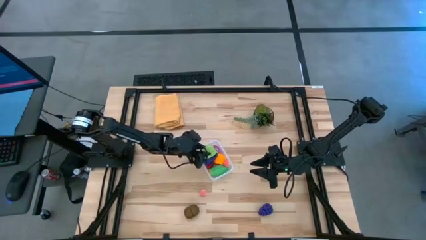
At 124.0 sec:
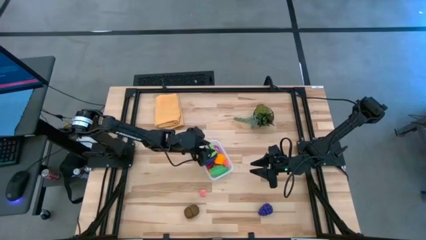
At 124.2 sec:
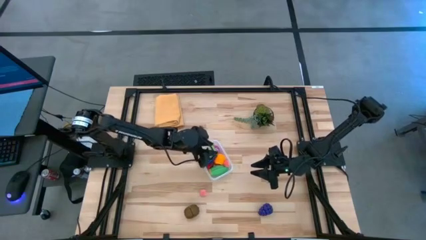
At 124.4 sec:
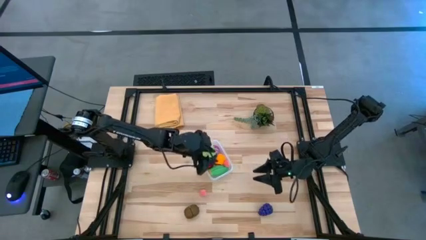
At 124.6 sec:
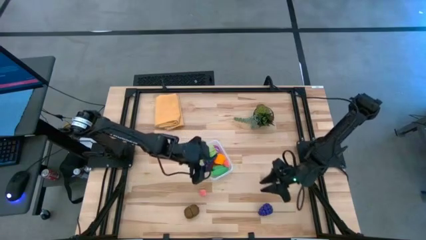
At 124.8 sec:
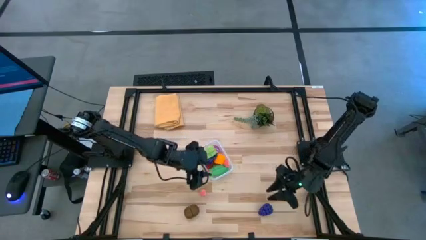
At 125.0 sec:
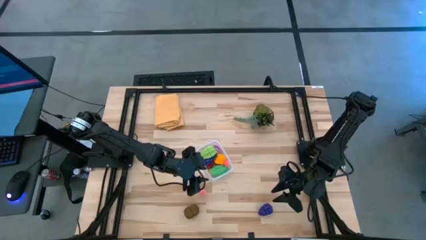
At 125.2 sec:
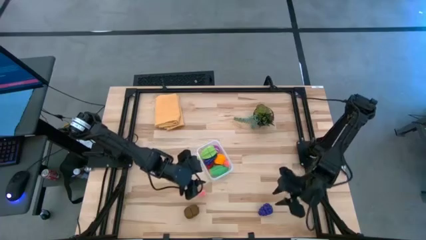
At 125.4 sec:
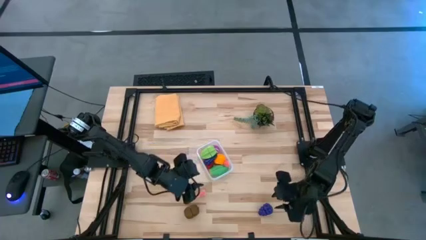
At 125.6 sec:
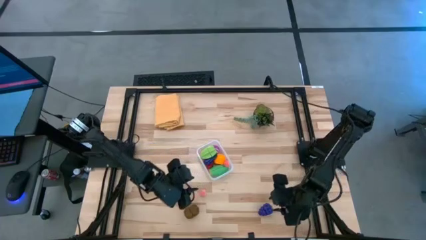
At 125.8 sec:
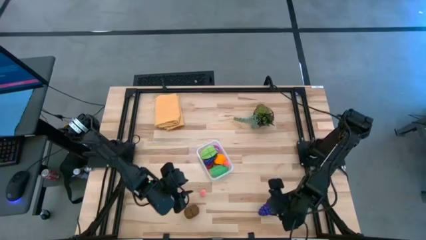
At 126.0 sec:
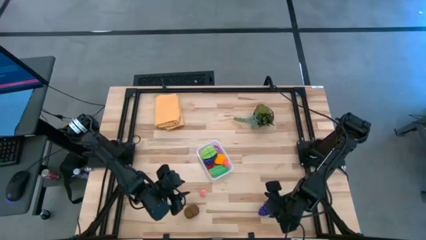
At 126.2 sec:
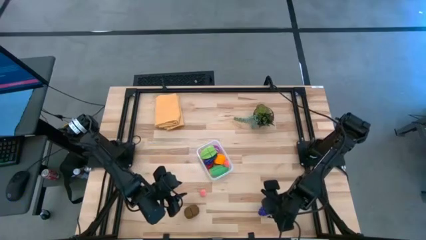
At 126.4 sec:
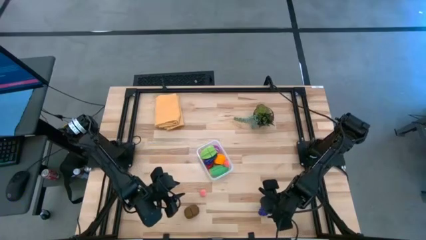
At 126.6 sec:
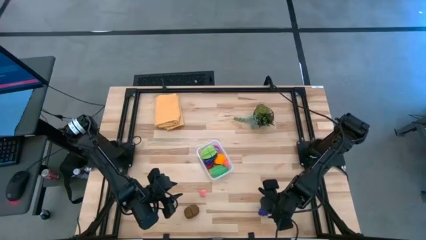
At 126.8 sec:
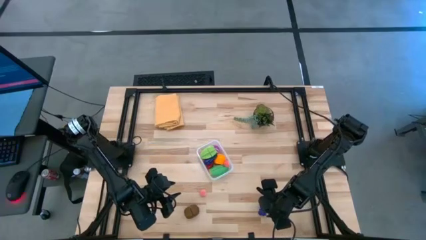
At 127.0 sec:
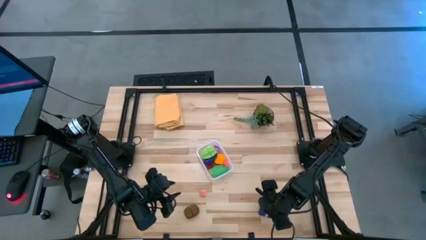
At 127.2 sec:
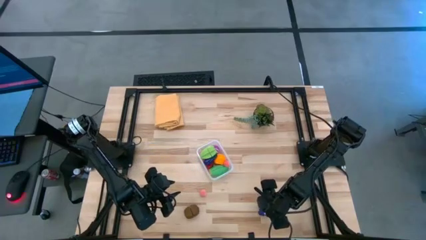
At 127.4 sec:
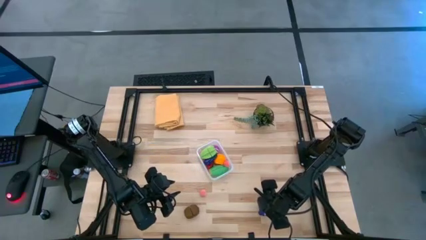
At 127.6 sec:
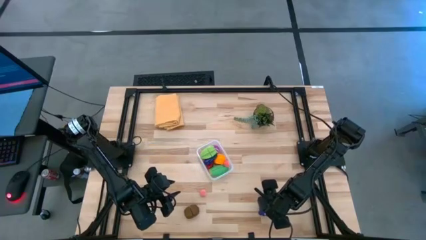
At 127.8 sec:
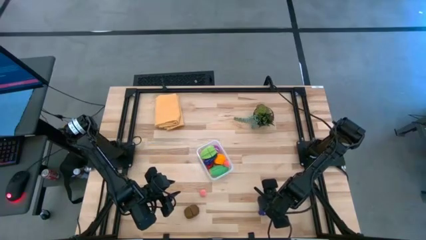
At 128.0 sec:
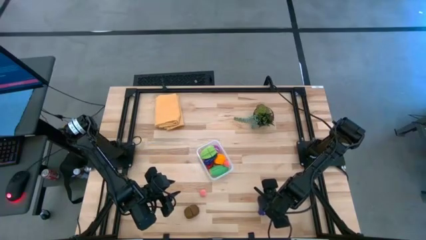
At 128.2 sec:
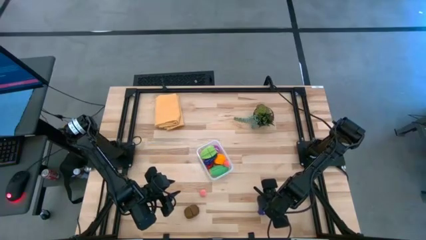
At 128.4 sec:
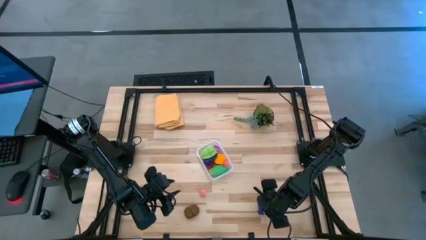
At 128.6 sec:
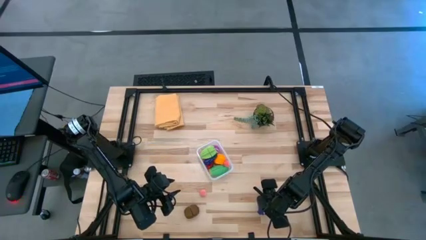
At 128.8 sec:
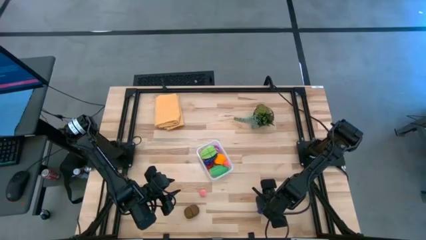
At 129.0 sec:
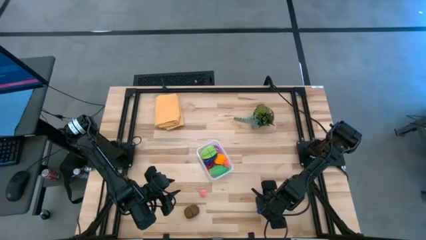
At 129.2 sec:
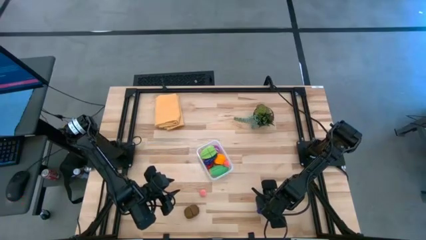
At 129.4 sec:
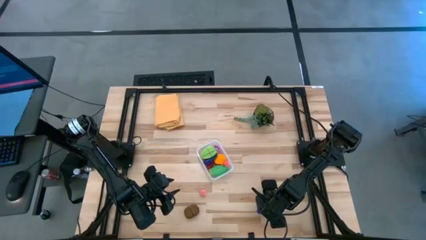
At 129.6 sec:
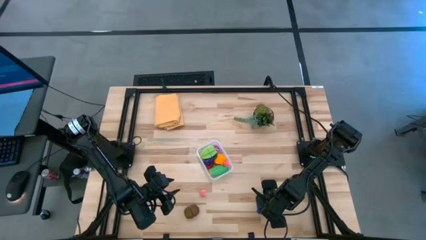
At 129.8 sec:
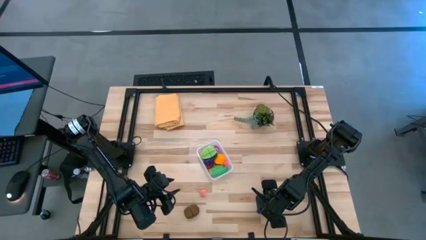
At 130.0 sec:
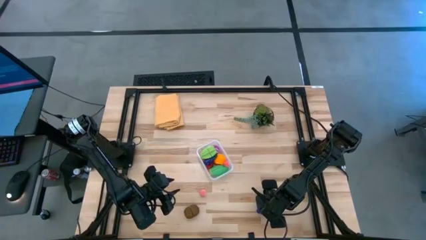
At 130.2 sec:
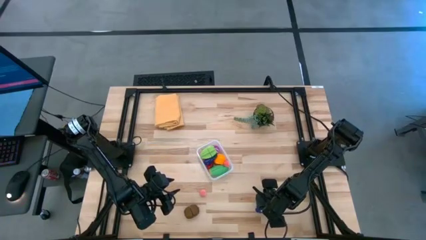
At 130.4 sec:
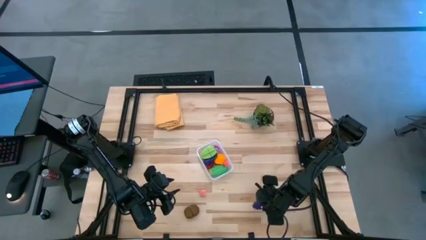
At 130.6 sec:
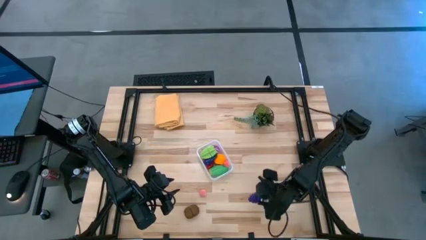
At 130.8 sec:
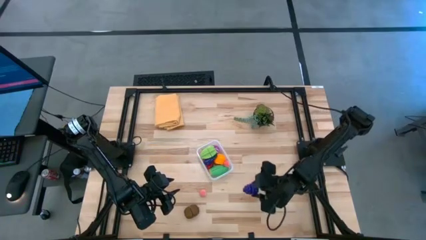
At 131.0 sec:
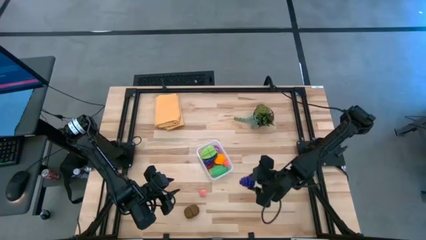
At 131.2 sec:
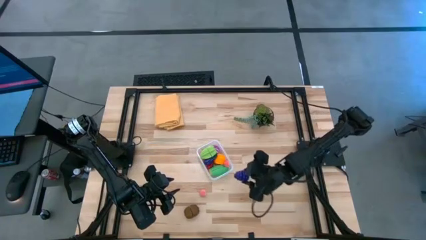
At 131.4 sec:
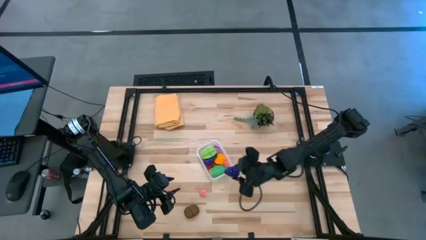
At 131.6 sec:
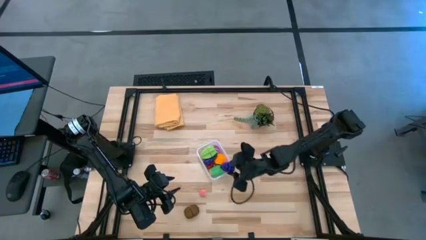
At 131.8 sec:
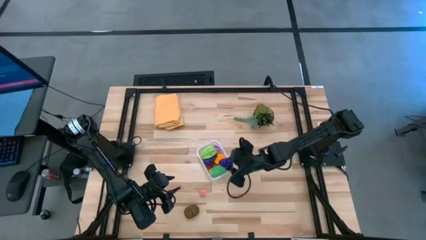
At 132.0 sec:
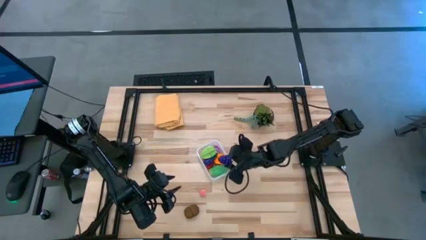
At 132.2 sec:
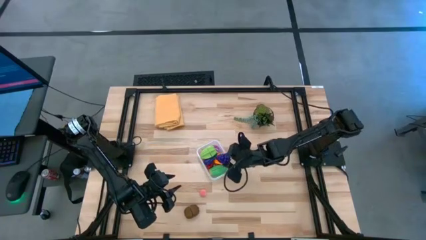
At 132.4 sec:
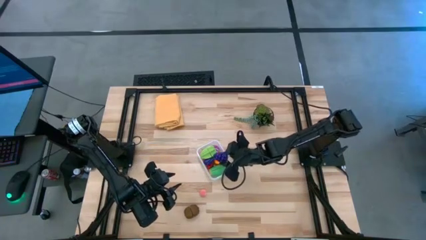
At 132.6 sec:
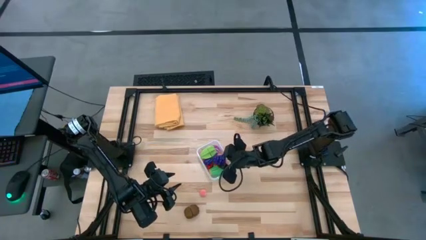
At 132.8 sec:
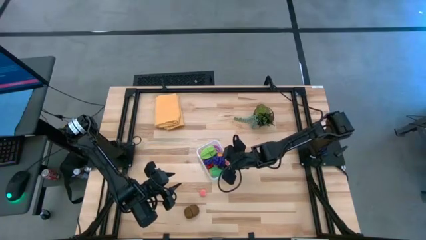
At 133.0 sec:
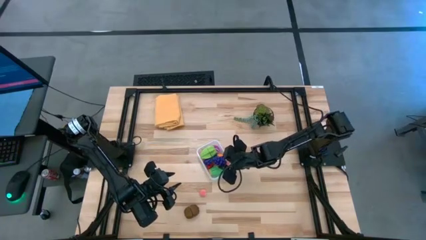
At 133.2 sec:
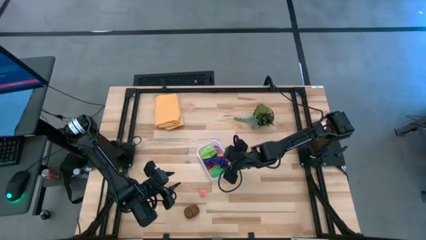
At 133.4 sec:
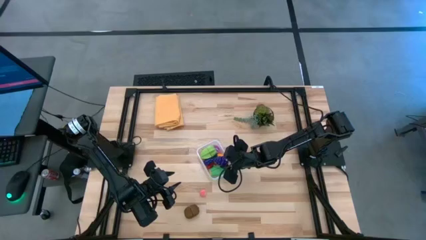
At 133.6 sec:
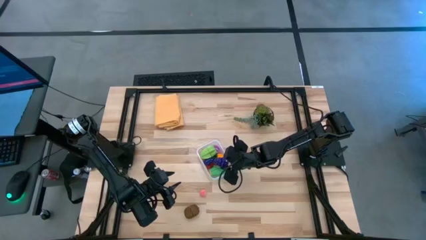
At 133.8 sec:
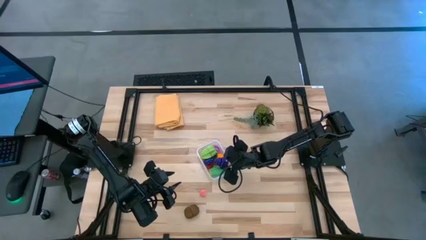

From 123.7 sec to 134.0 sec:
Task: Pick and placing Produce into tupperware
Put the violet grapes into the transparent bin
